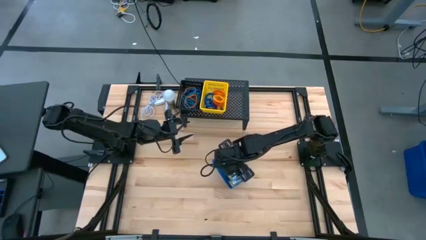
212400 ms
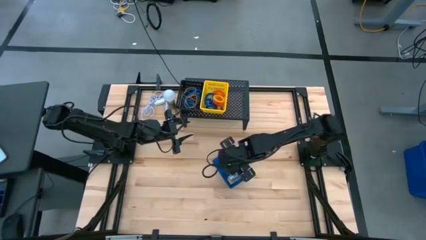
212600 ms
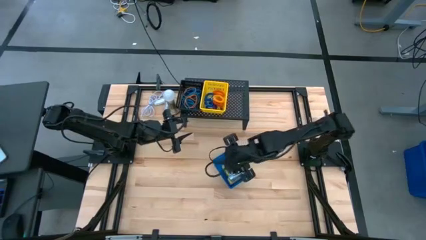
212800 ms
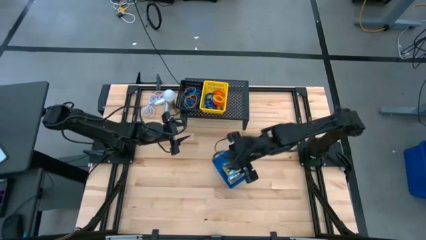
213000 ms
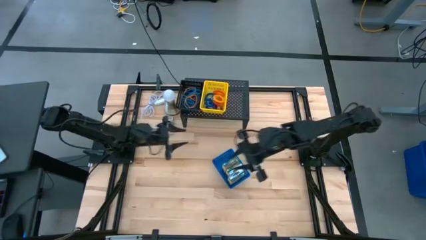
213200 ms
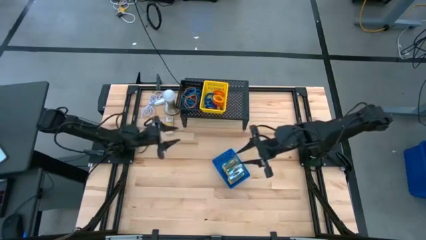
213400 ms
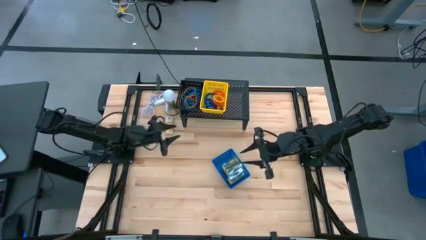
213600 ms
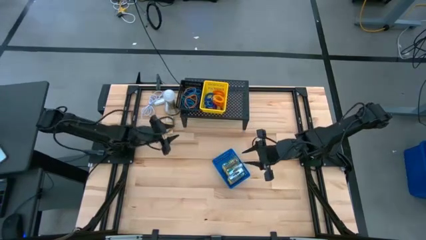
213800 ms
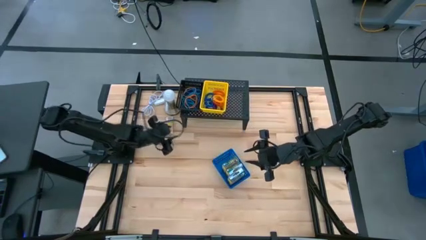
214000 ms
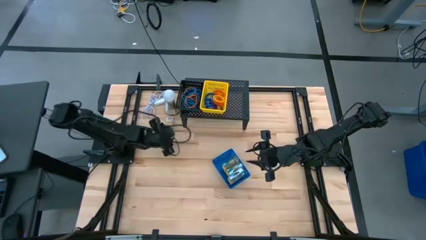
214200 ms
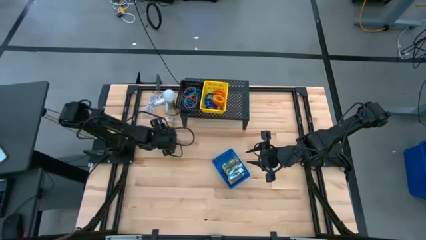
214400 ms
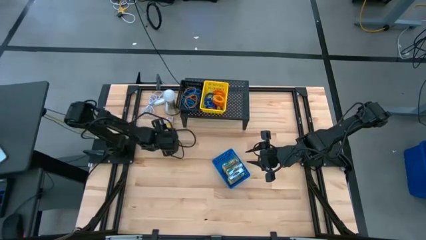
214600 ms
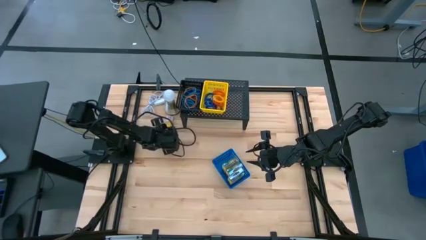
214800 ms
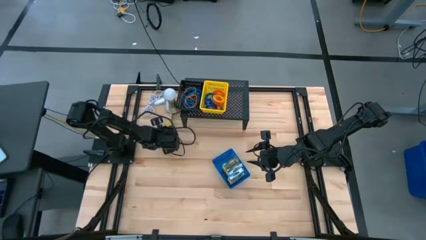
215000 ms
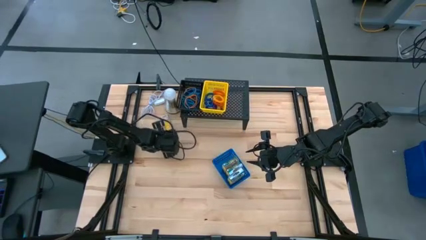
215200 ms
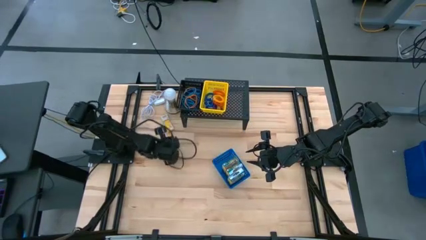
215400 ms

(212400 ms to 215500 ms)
Task: Pick & Place Office Desk Supplies
Put the small yellow crayon box into the blue basket

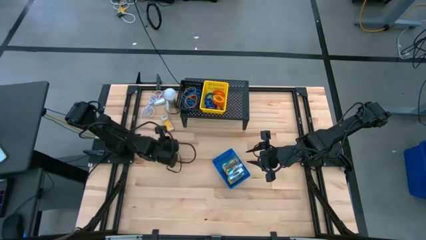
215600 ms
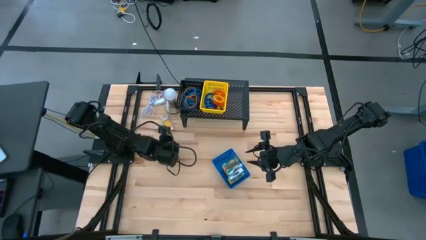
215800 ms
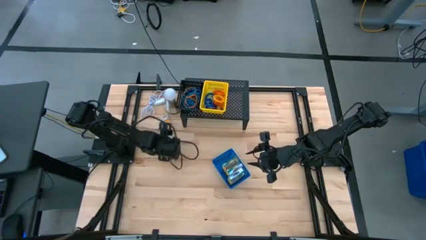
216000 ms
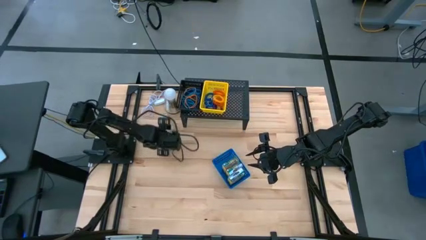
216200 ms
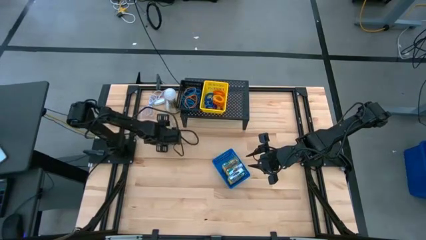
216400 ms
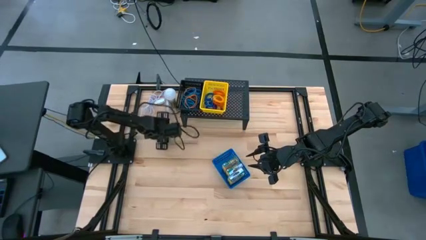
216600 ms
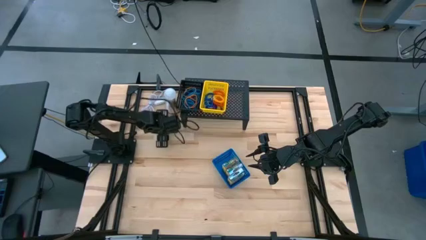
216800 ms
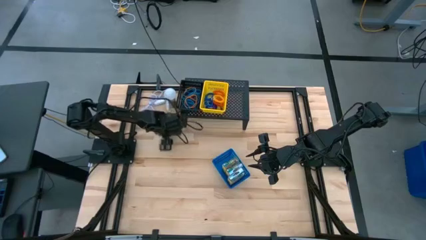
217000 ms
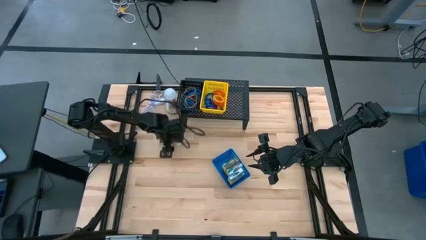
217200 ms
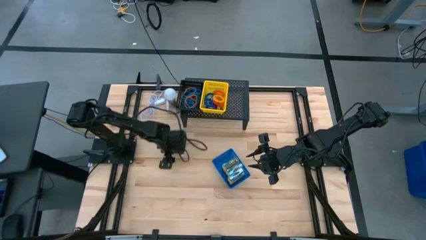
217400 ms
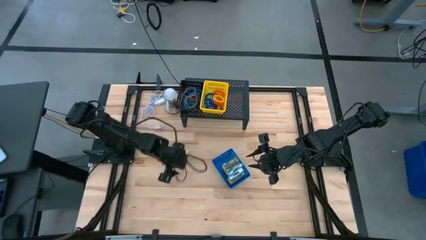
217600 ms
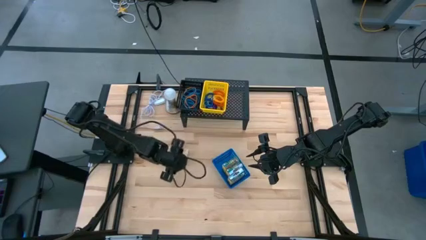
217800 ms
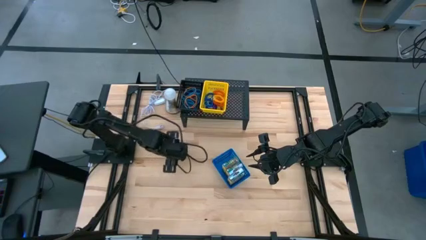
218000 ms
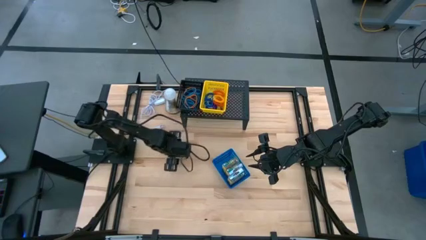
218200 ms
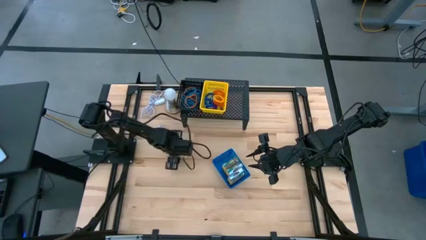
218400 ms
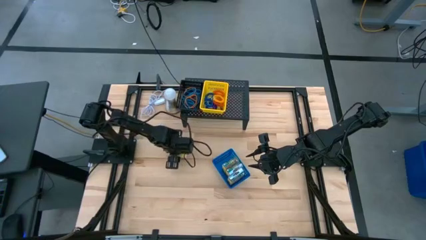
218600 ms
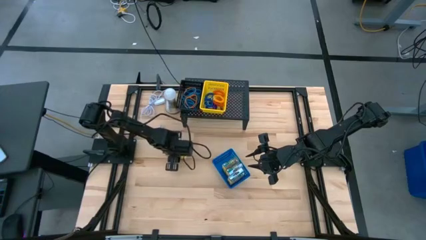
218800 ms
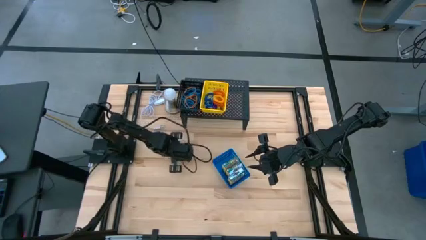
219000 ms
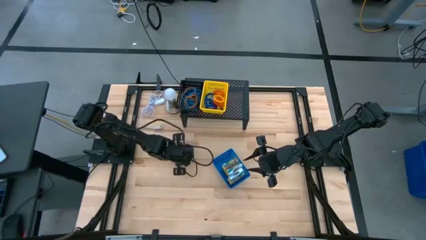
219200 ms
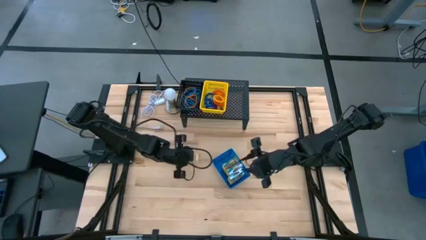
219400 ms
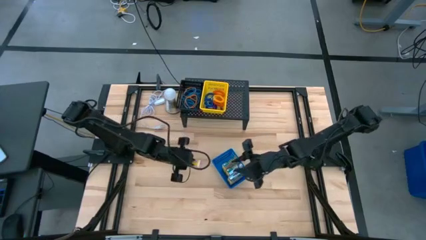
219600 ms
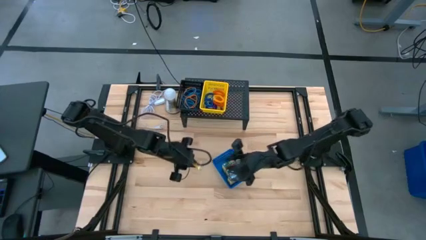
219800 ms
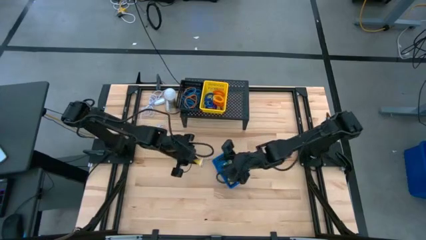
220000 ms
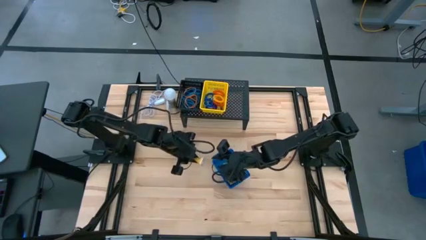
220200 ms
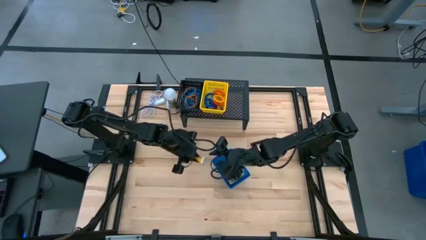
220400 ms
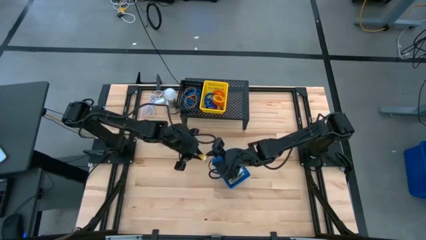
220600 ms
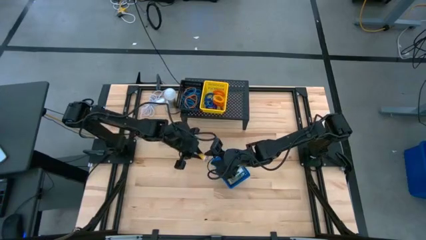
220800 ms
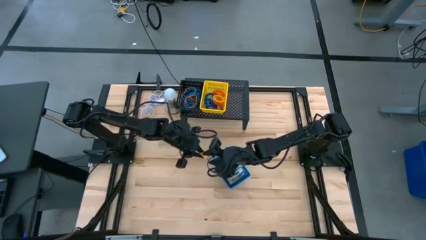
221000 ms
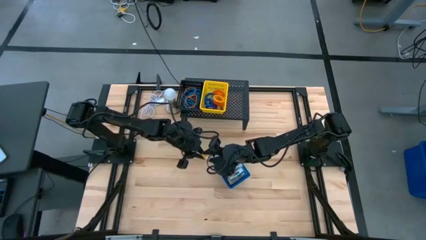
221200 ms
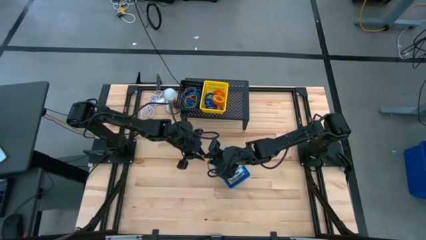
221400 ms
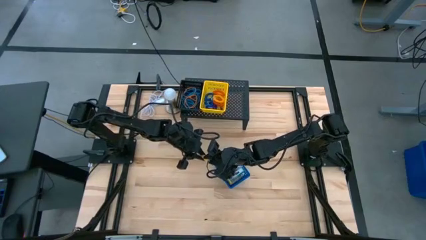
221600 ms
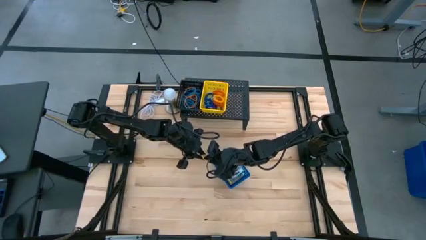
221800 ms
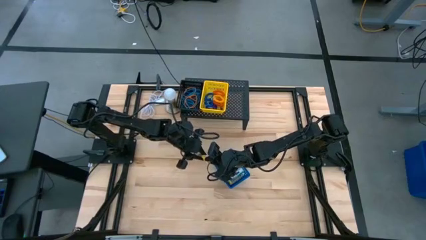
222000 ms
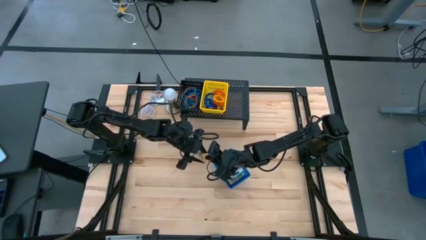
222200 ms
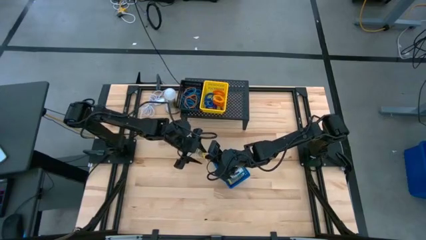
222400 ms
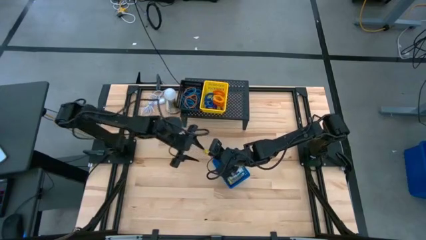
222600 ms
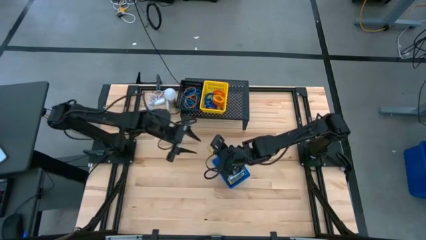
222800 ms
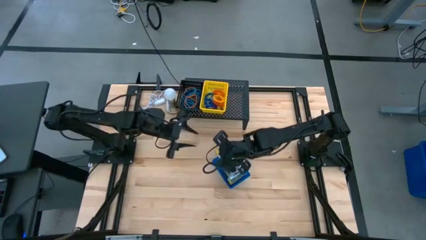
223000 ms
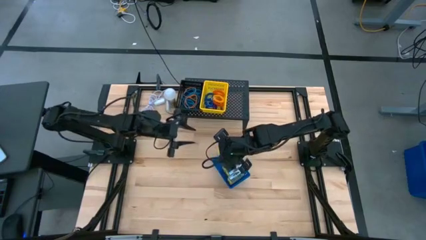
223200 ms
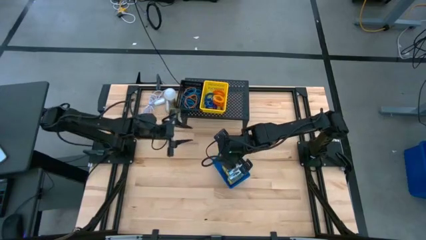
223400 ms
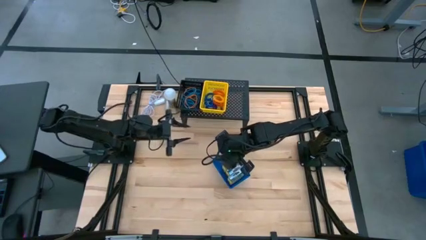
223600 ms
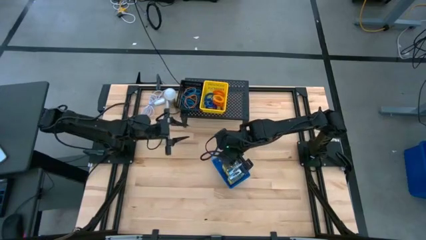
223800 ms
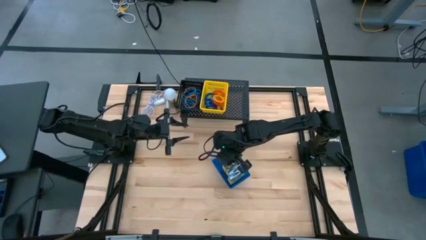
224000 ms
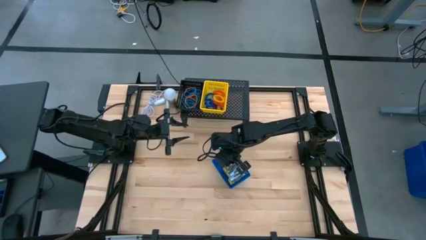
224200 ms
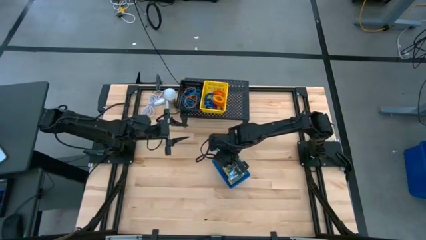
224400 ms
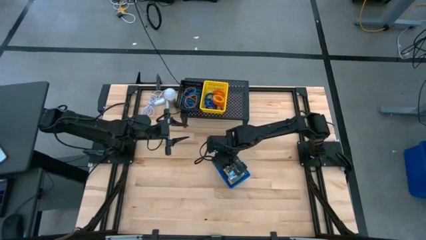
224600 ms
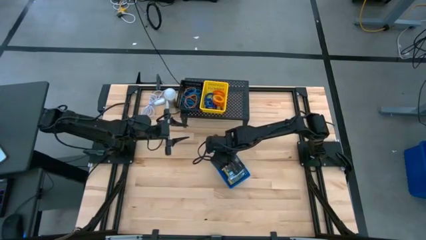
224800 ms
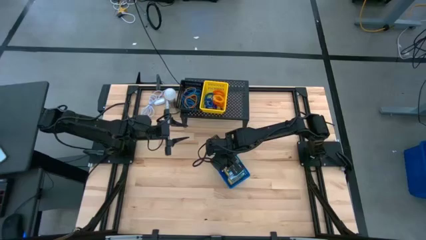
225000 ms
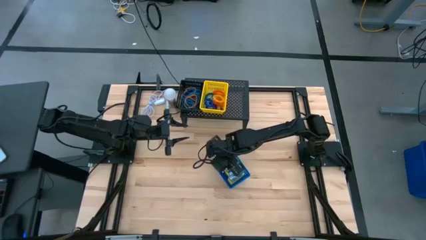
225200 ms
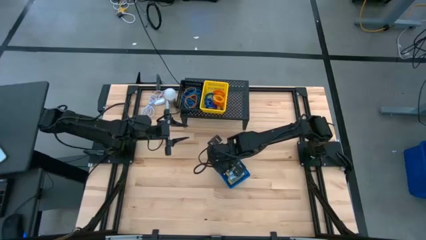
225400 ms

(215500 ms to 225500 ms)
Put the small yellow crayon box into the blue basket

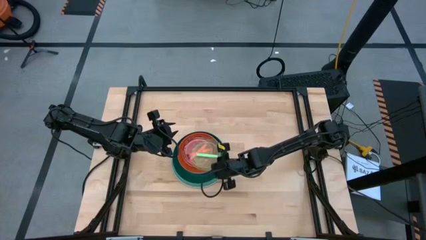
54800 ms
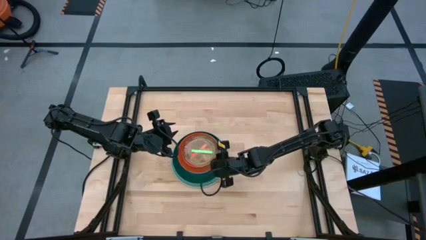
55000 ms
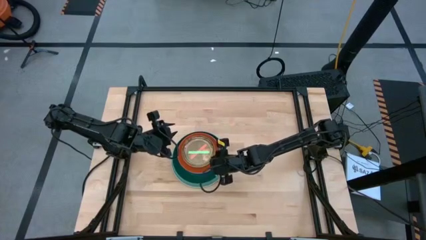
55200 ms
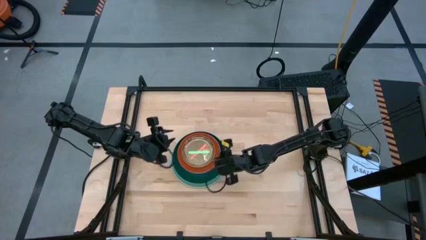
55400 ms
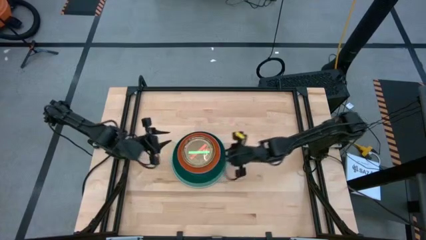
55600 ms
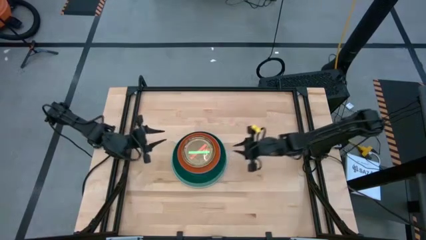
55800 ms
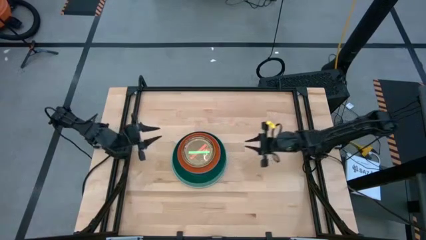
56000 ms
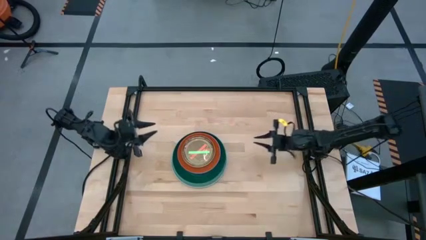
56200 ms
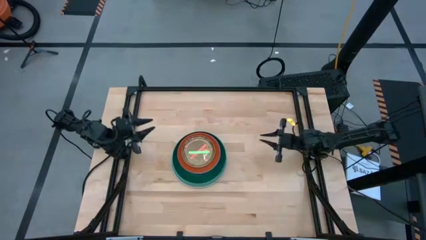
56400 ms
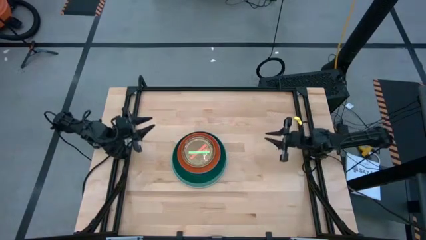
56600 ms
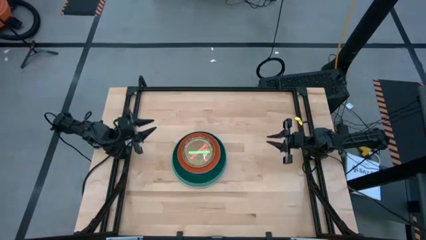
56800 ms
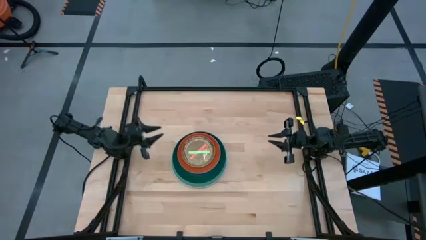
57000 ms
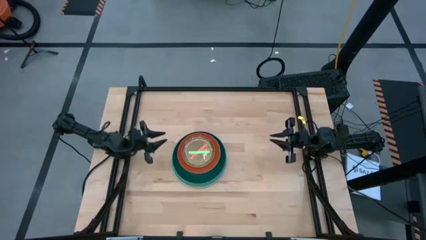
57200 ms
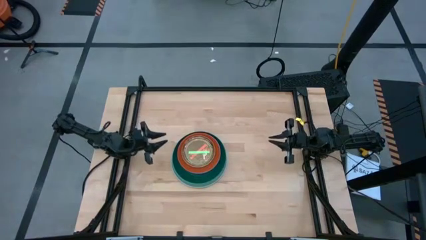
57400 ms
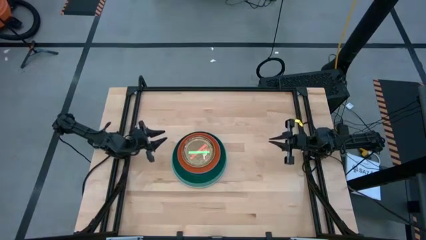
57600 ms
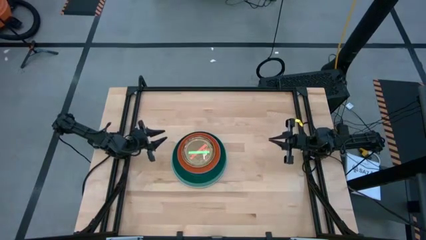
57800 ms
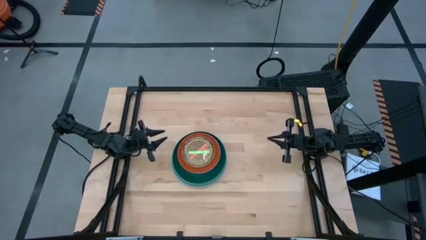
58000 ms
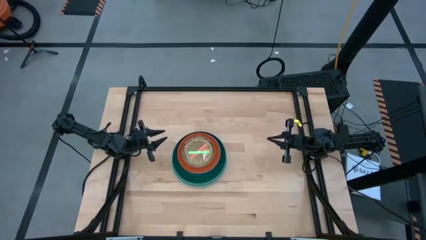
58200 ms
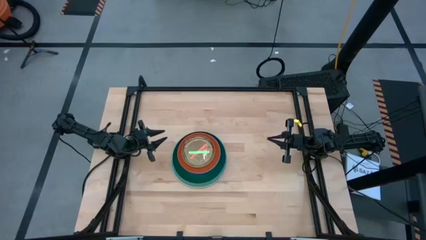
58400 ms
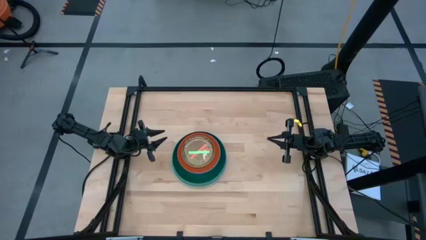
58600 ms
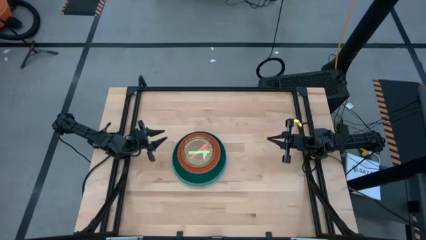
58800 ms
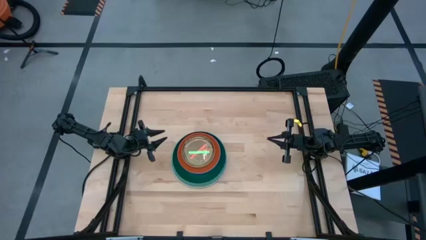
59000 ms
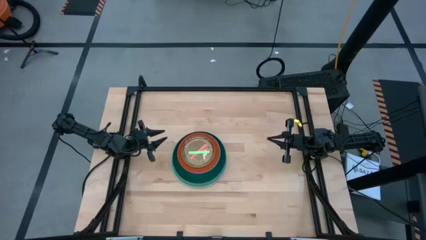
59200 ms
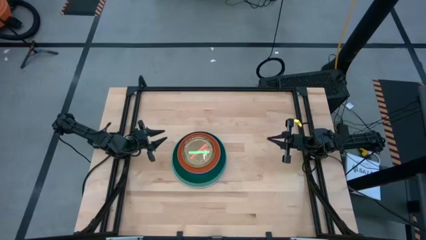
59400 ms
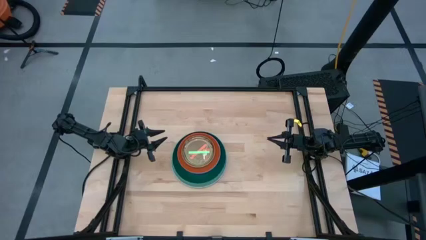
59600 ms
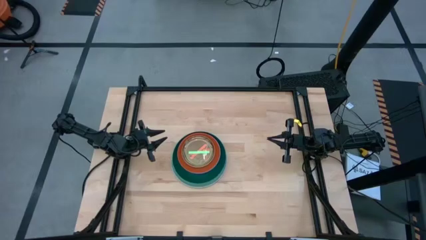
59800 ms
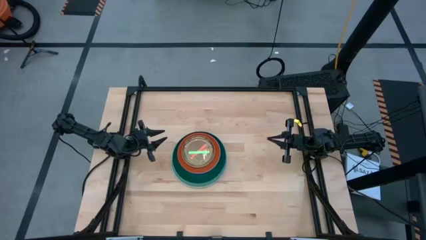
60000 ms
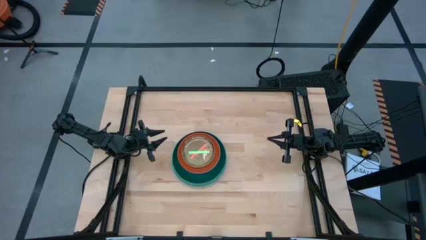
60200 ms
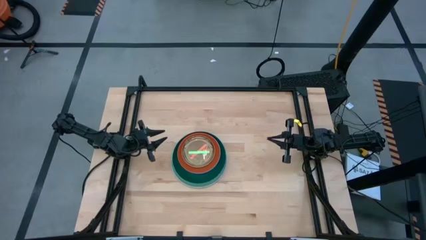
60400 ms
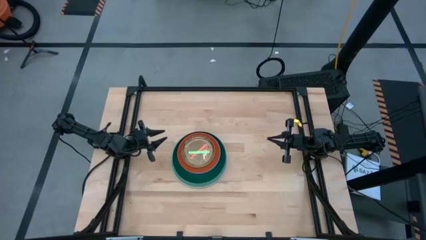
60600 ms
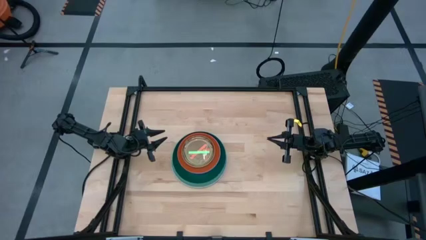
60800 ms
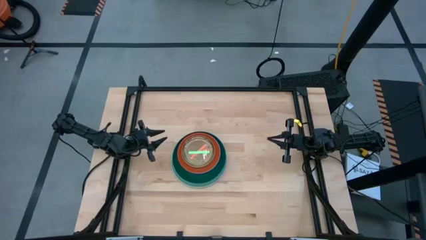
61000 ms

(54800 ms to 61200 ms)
Task: Stack plastic plates
Return to Home Position
